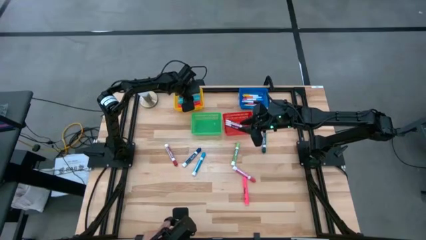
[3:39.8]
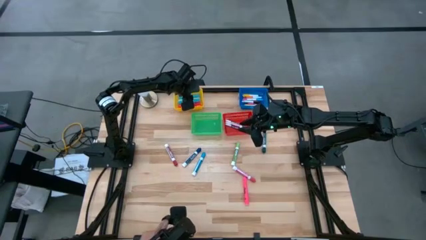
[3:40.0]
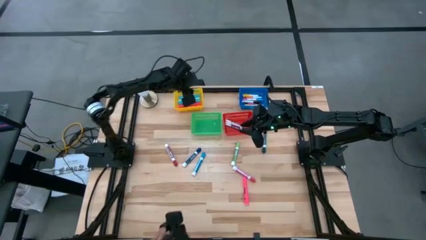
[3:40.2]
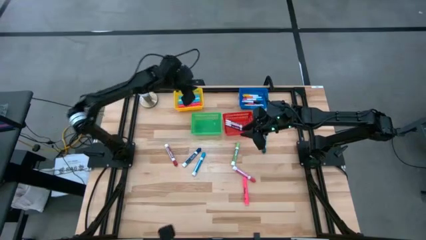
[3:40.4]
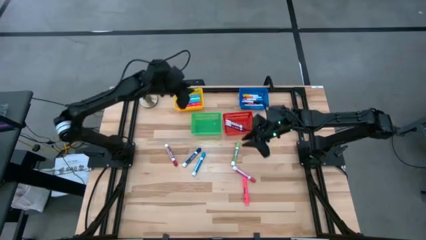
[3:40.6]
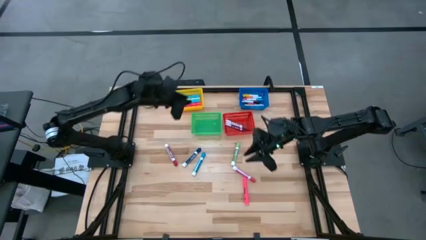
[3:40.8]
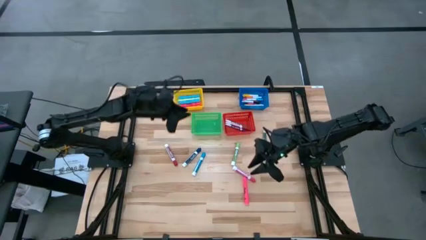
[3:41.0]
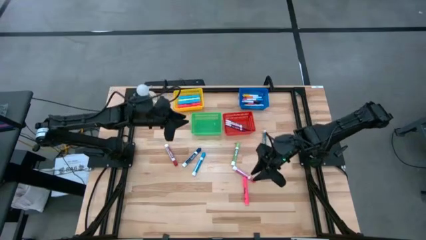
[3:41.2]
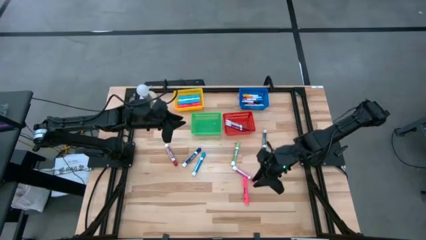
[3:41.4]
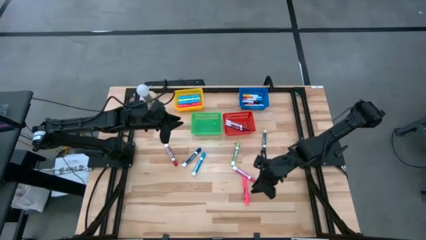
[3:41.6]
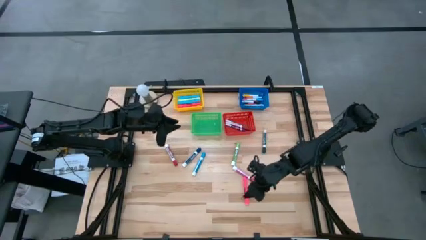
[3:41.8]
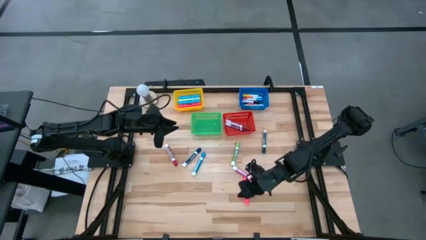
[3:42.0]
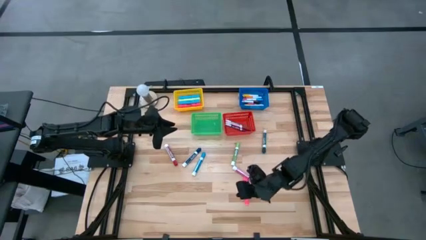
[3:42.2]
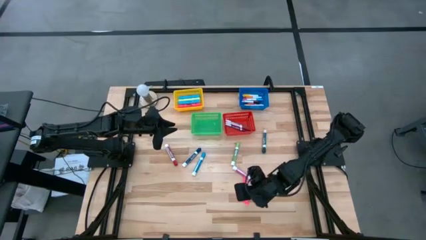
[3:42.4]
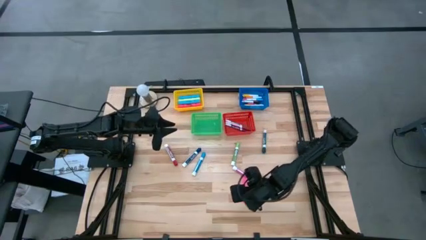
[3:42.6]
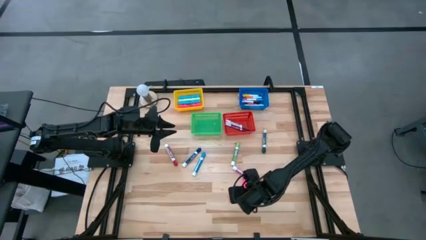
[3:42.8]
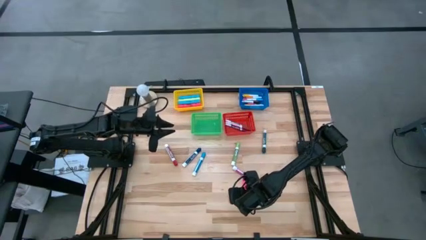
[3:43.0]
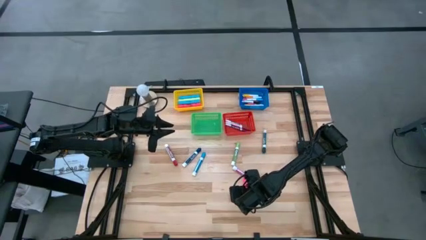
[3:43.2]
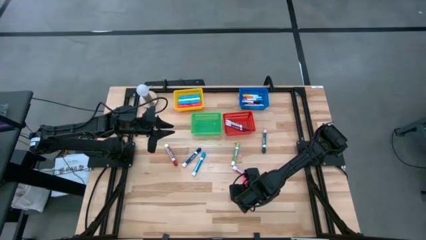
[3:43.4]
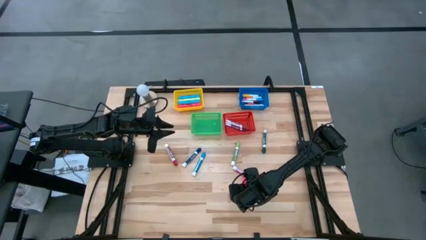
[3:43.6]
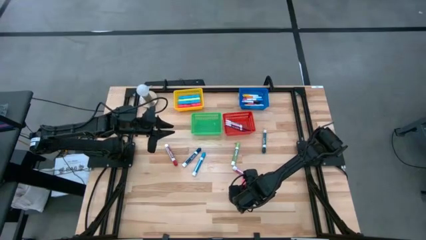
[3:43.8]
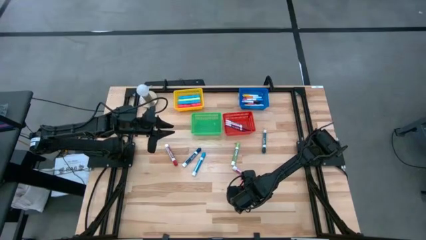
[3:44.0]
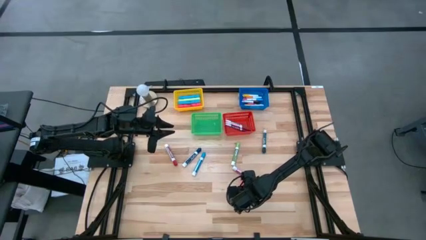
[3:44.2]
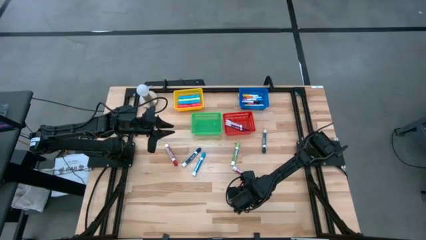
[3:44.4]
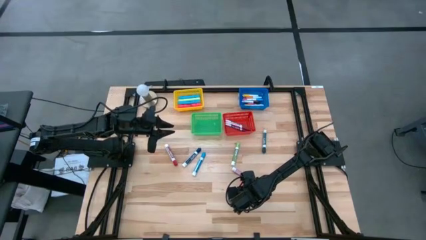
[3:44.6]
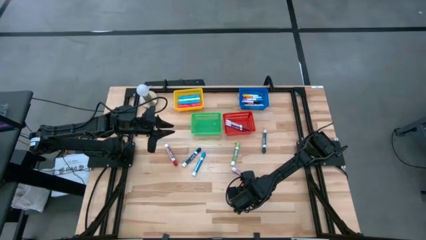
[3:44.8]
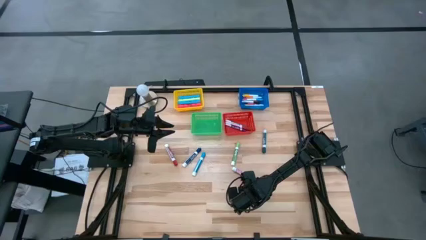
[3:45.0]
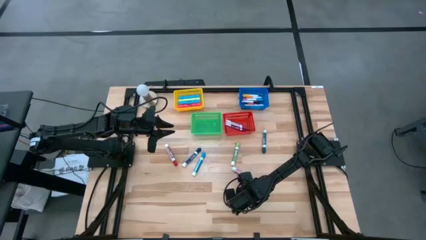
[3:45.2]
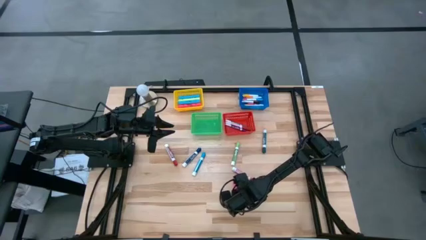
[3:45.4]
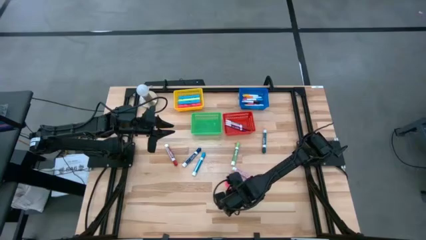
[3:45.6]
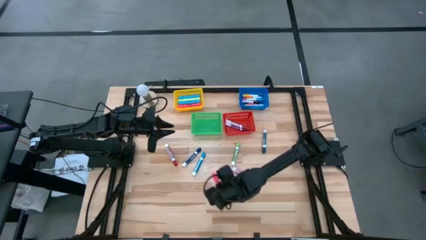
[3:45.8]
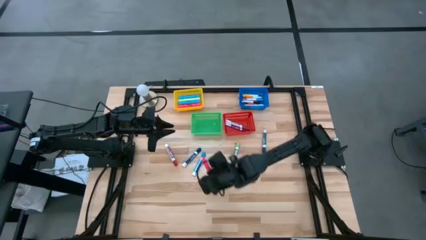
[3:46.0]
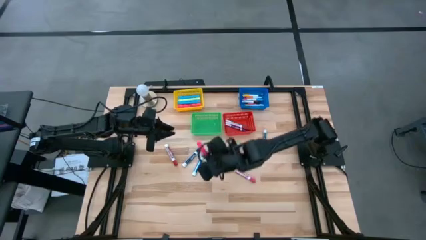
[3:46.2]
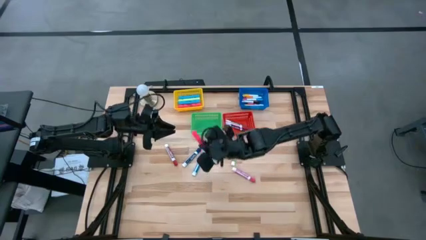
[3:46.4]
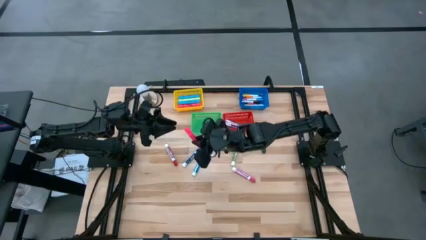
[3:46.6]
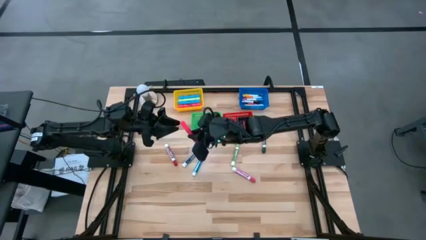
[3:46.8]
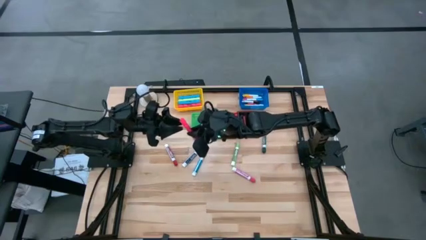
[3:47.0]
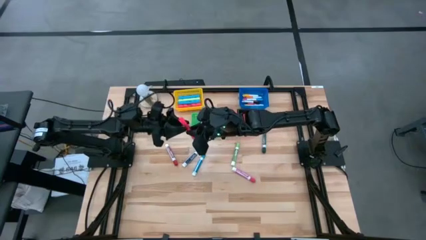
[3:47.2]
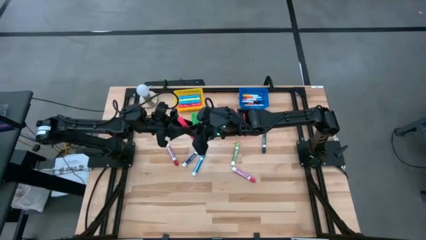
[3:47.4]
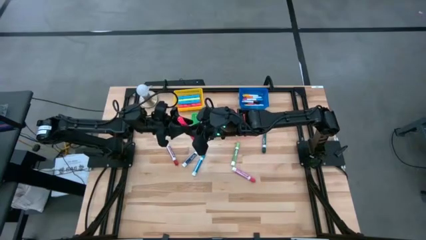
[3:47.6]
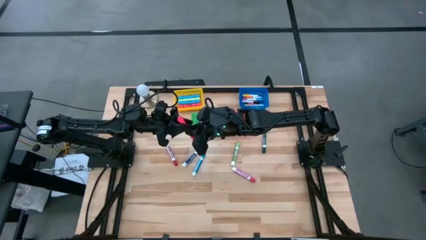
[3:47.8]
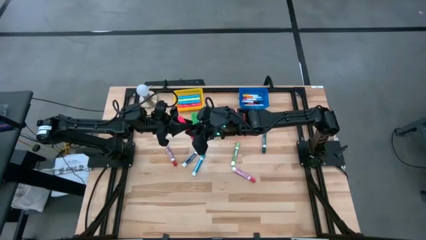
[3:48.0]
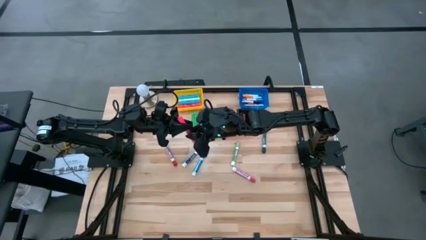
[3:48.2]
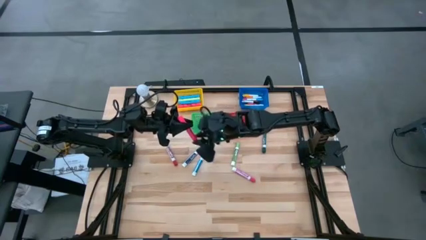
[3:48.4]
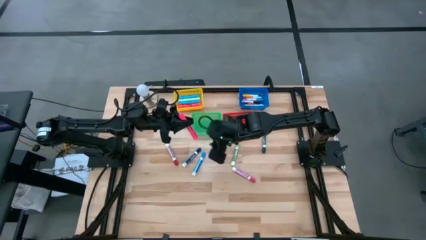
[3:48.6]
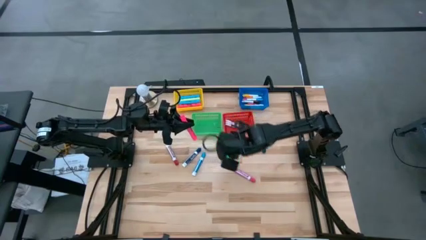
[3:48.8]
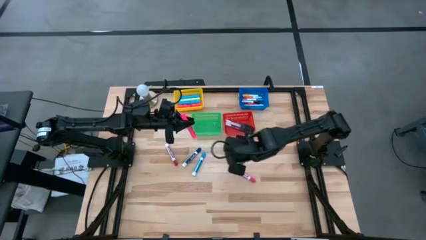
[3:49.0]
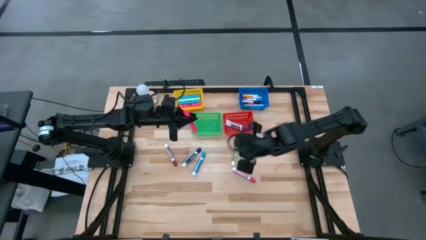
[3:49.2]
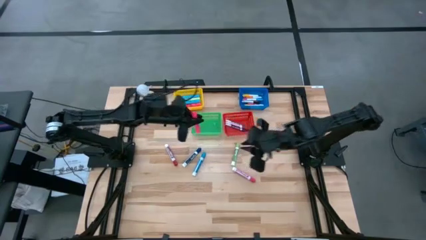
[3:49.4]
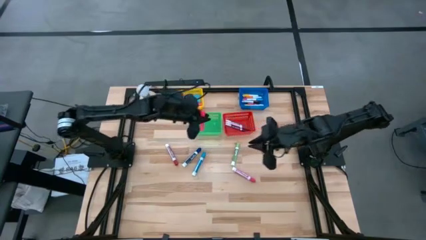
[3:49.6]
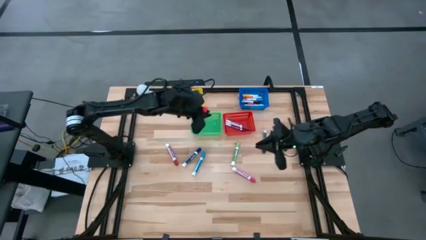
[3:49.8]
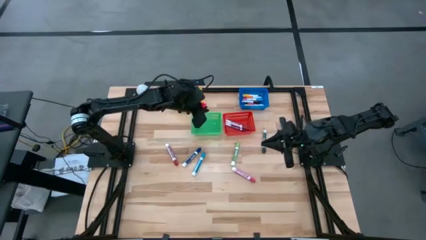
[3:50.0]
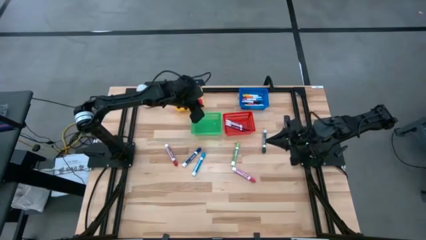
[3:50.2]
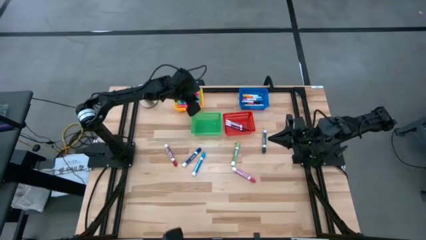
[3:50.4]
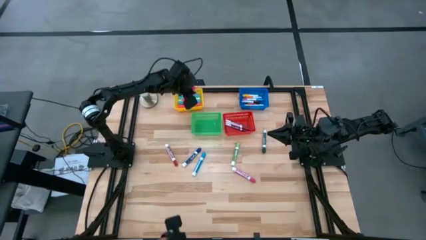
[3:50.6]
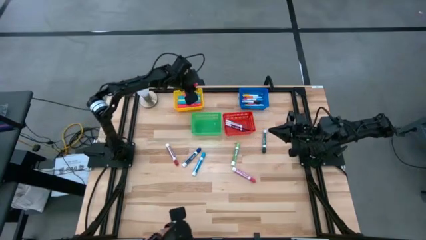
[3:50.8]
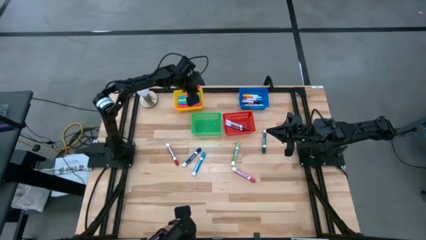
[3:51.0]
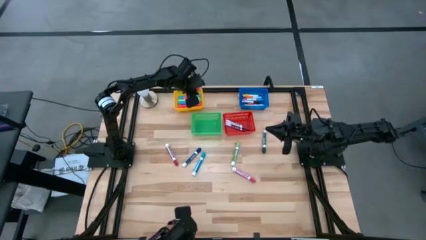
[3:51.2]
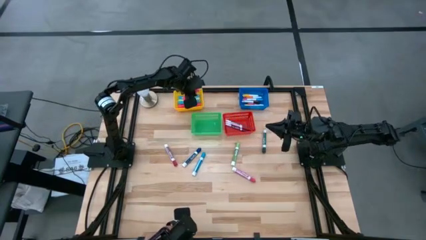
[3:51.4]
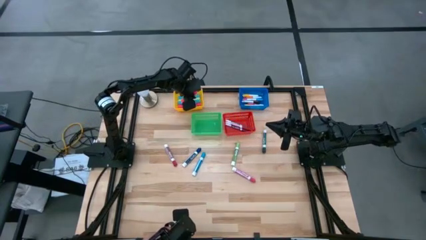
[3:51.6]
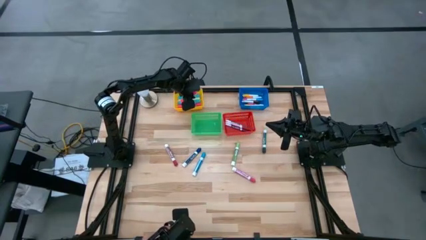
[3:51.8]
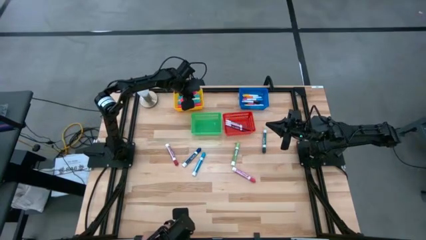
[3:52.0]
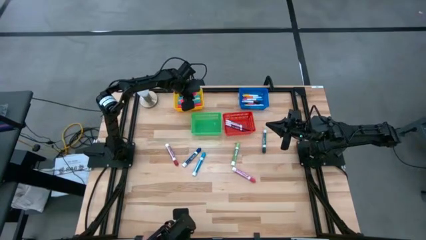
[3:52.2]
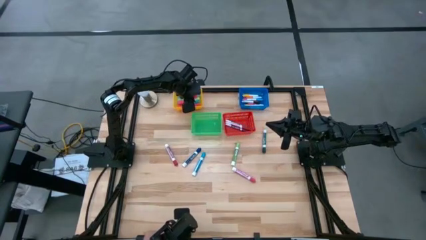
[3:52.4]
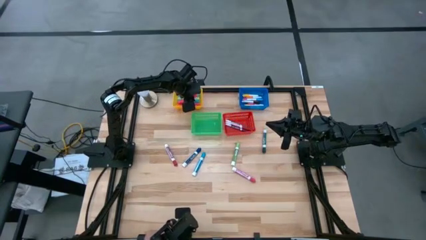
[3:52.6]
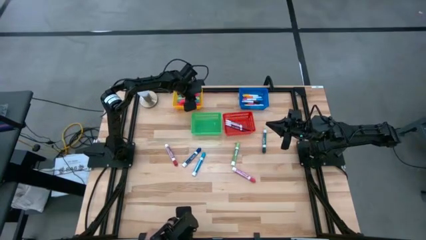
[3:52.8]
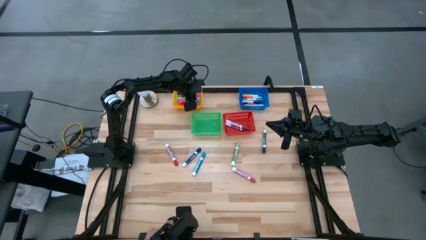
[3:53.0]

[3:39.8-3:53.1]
Task: Pick & Place Markers
Put the pink sharpie into the yellow bin
